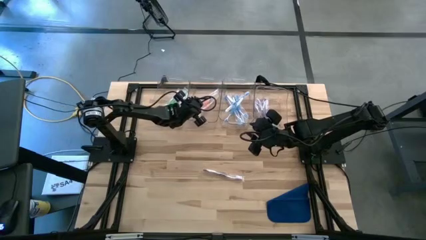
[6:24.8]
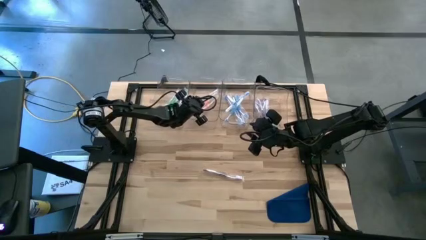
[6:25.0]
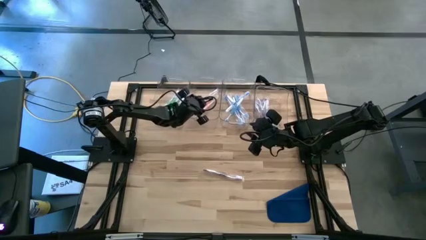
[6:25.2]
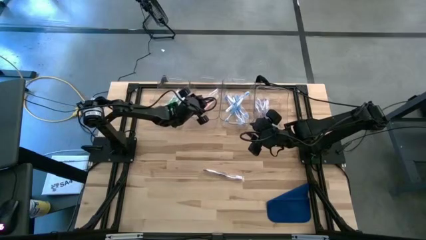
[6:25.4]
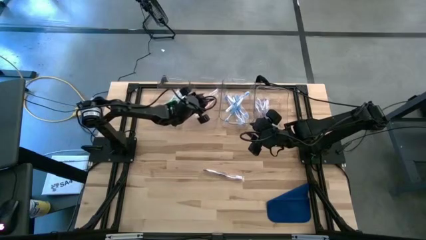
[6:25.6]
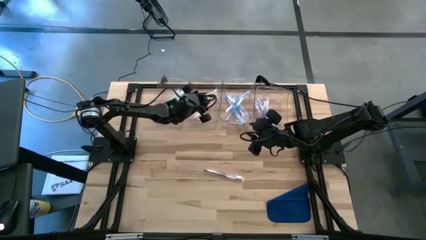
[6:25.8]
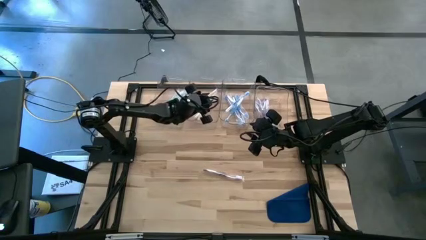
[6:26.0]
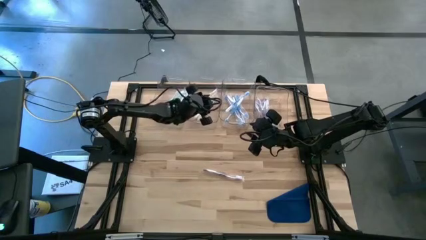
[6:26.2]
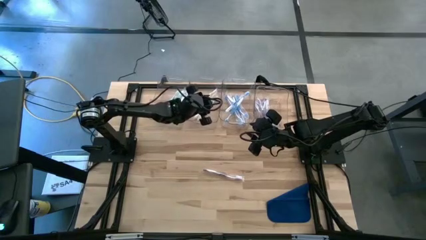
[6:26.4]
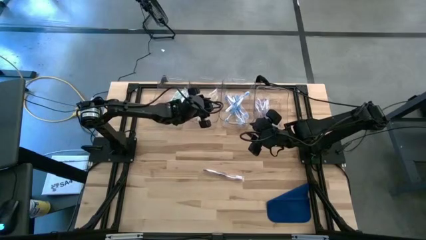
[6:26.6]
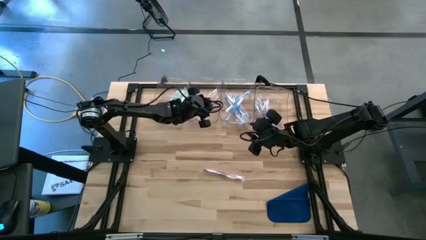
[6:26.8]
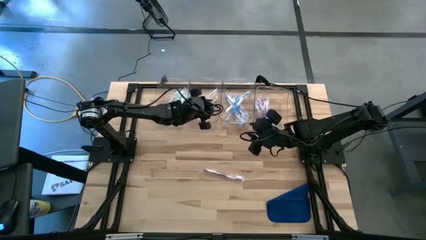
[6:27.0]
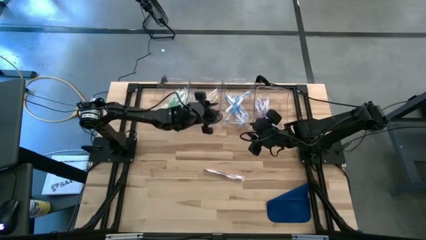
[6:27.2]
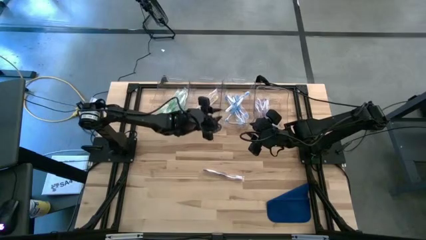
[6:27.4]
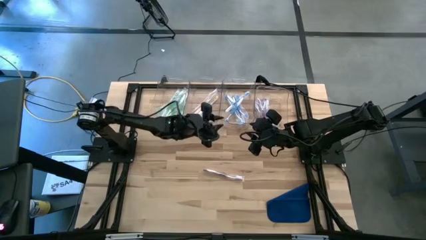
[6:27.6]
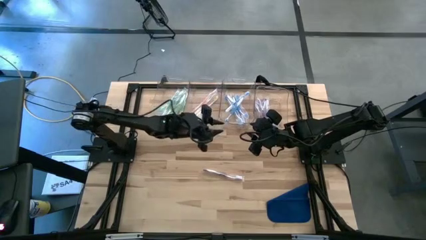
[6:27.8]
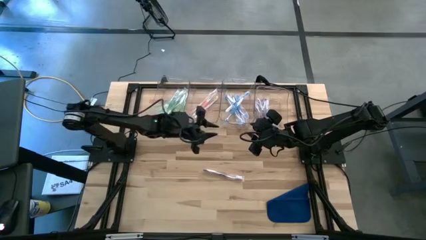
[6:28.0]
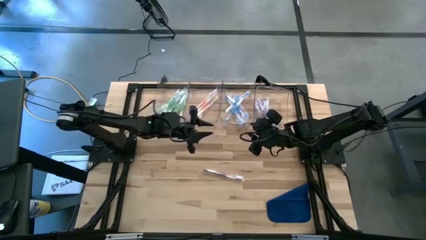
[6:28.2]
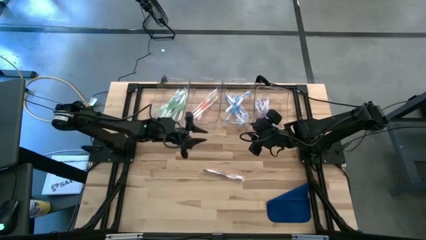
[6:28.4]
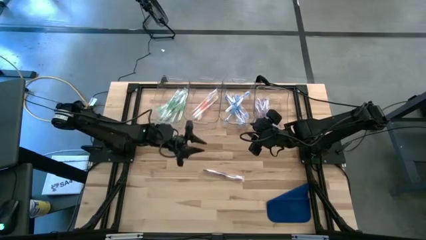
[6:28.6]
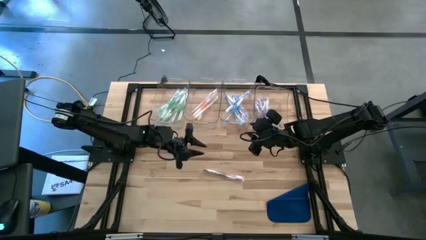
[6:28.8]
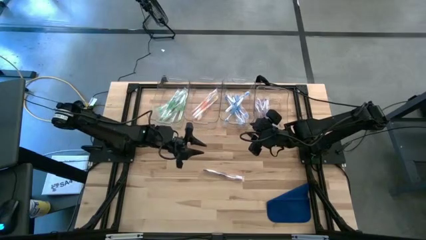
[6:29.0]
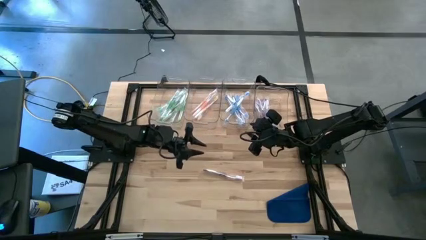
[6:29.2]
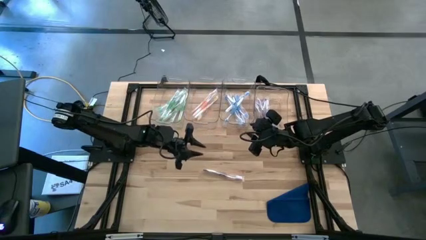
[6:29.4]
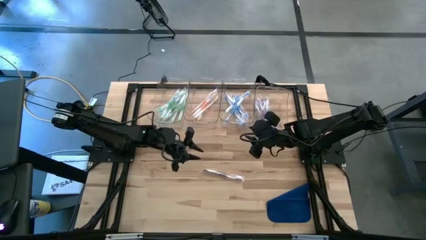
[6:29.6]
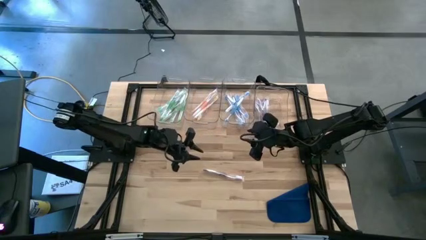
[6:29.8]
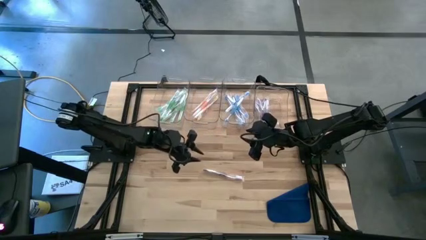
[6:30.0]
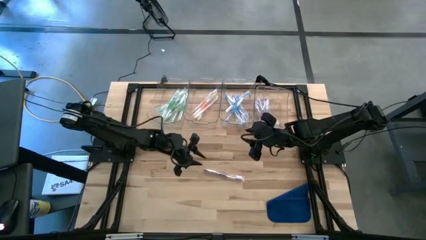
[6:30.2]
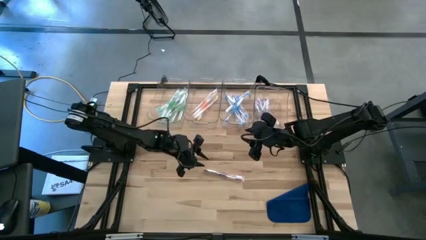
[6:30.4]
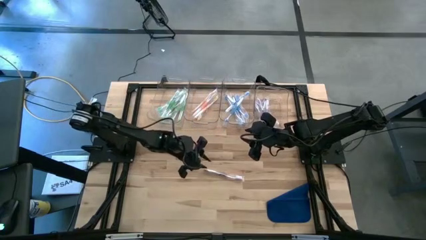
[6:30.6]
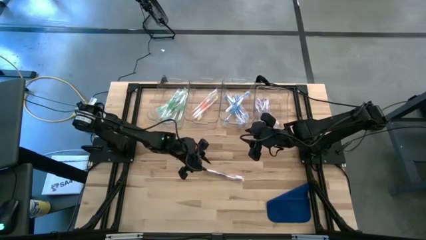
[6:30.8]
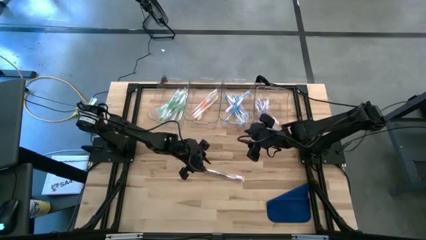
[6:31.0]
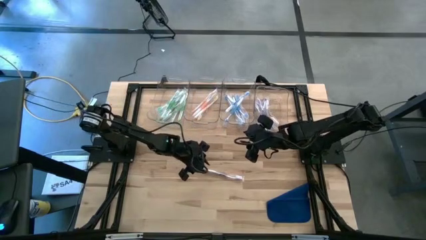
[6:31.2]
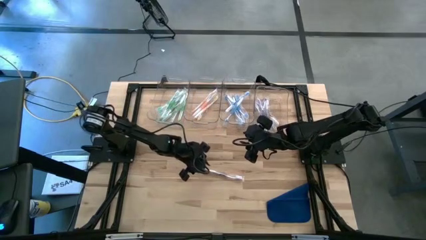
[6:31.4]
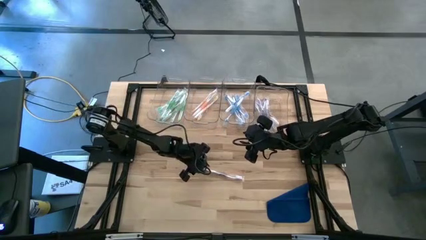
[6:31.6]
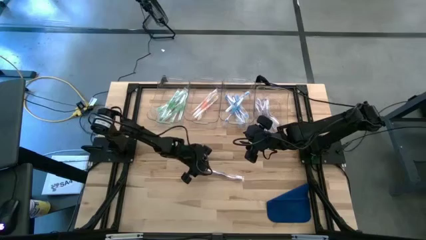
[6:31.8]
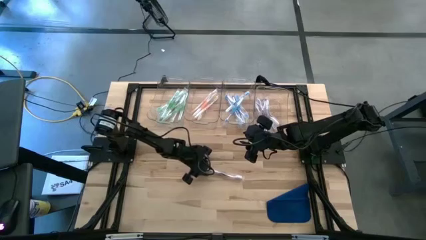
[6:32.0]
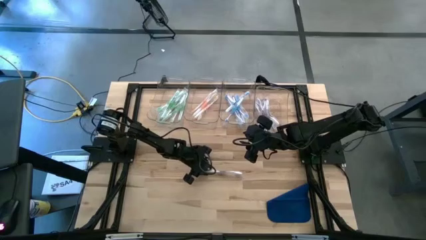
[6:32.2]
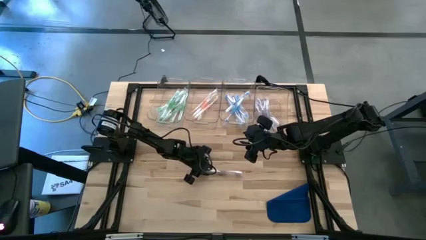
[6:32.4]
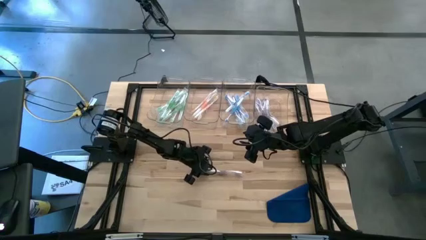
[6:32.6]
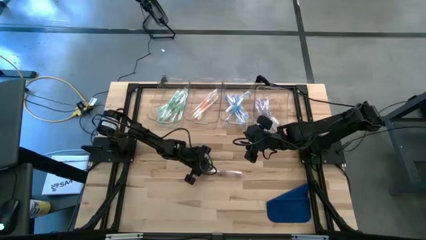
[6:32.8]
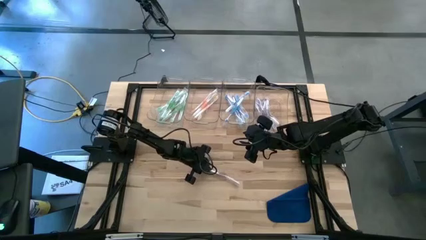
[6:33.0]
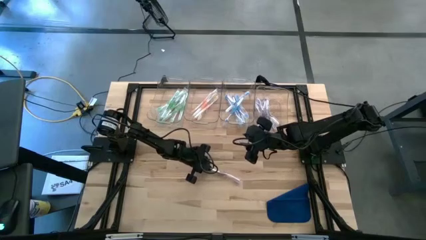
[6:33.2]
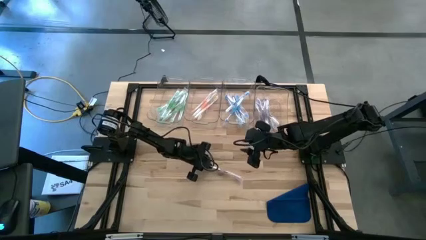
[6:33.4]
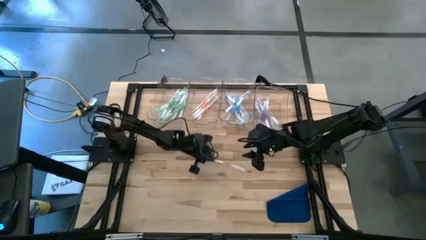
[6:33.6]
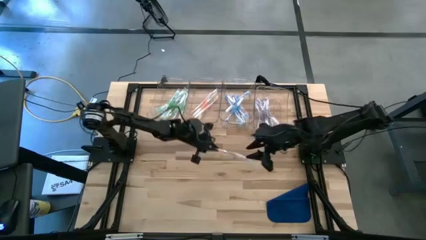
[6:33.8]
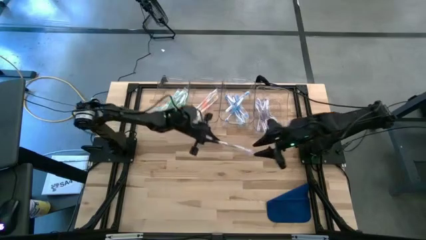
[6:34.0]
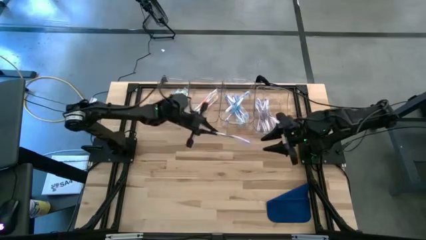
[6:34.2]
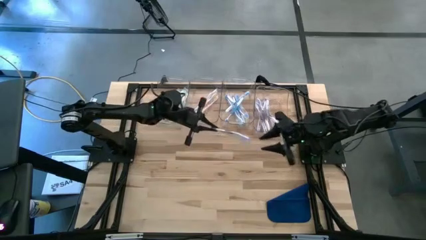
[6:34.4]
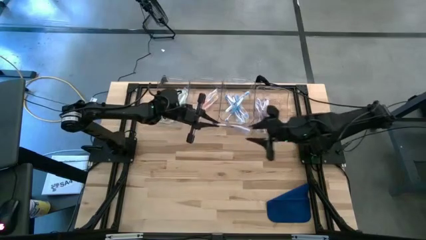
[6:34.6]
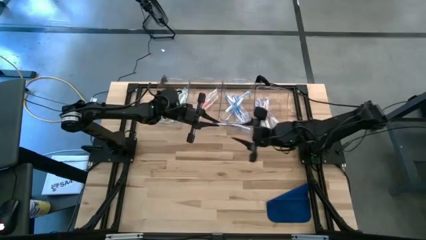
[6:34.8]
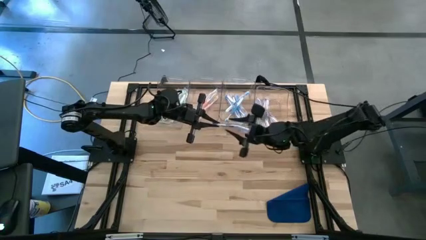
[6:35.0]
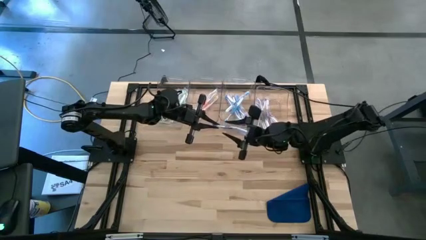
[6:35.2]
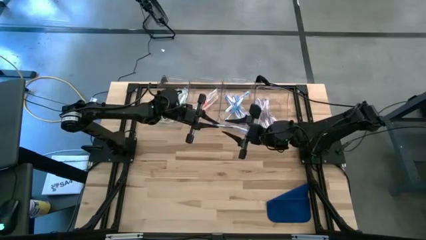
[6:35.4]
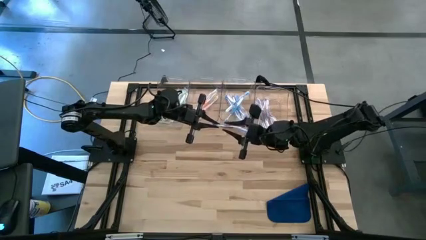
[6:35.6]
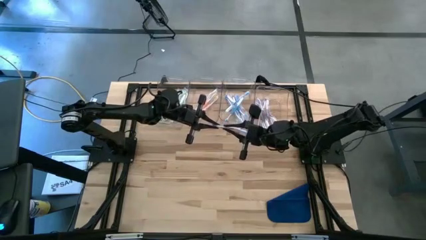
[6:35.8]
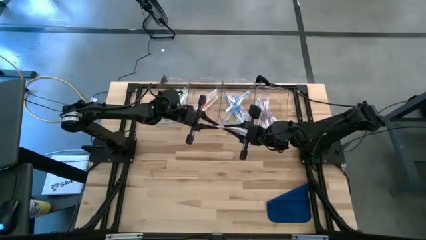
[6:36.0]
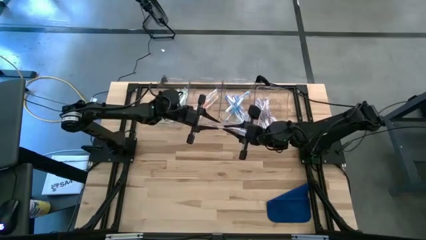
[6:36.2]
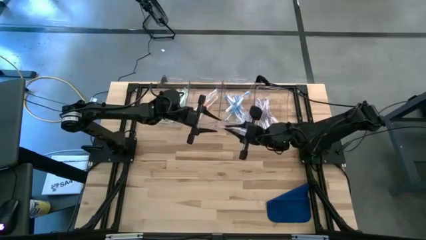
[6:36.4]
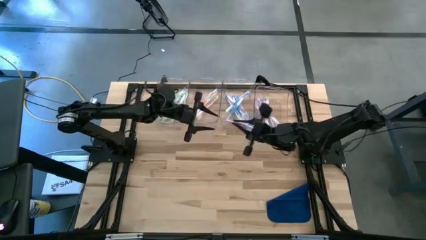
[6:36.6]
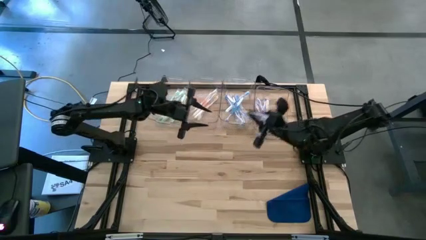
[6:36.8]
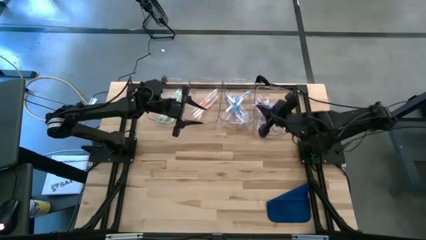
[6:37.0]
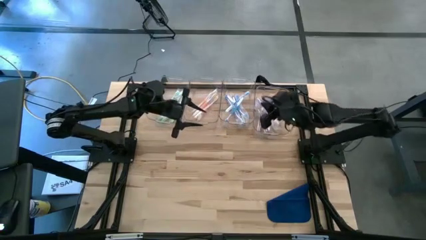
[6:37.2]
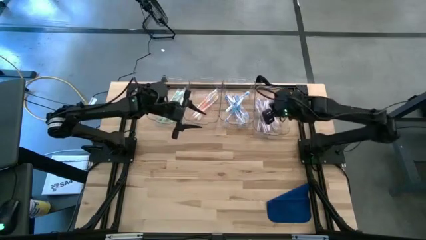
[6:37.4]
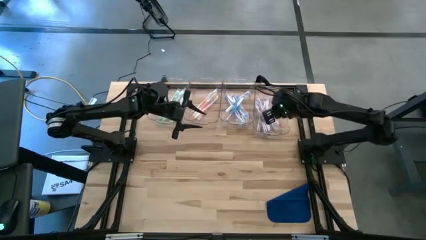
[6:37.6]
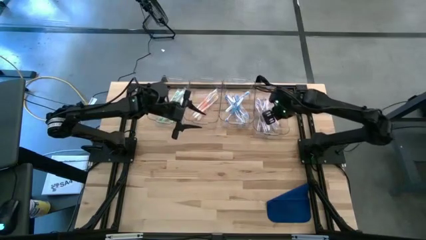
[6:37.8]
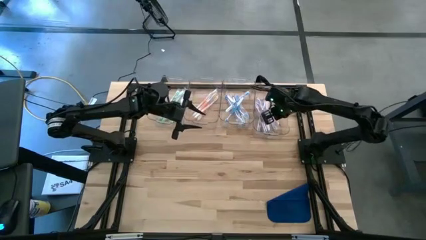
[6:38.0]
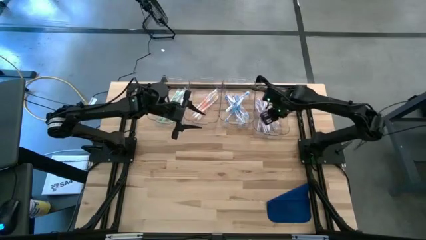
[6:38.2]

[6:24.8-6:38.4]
Task: Pick & Place Toothbrushes
Put the violet toothbrush into the right transparent bin

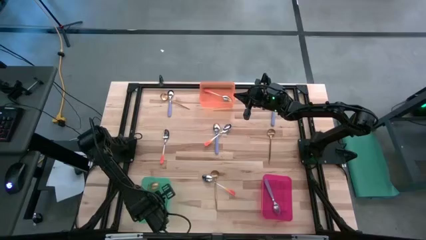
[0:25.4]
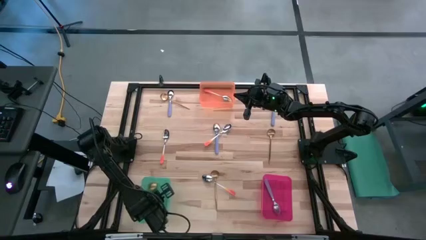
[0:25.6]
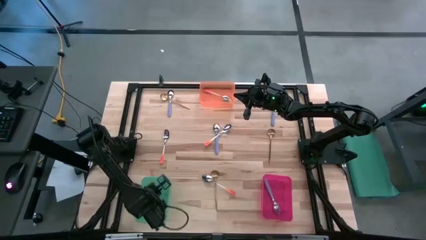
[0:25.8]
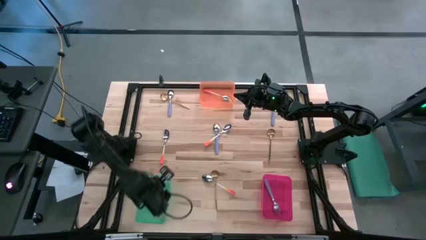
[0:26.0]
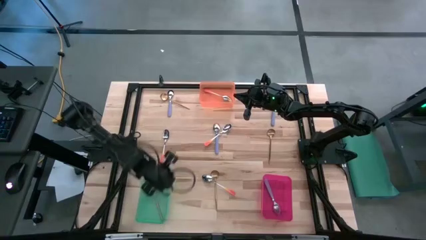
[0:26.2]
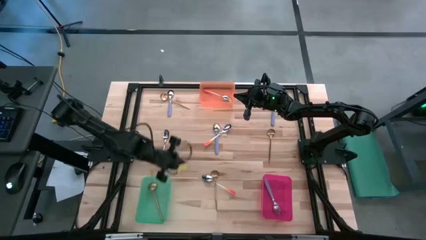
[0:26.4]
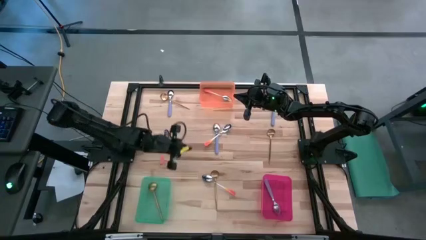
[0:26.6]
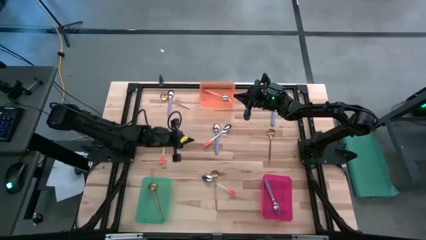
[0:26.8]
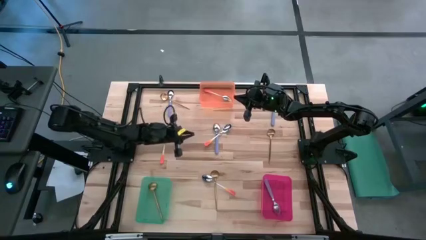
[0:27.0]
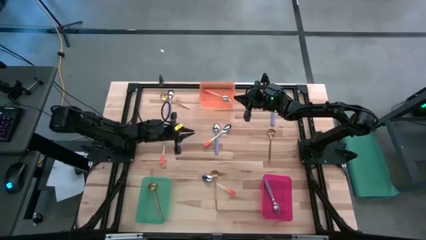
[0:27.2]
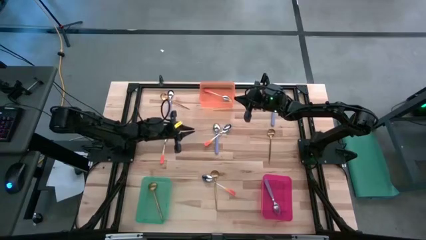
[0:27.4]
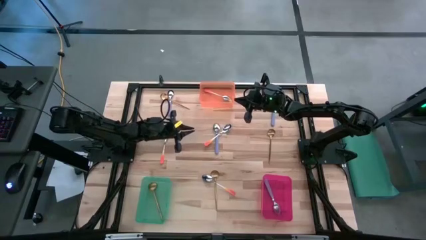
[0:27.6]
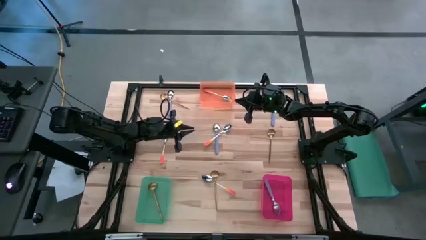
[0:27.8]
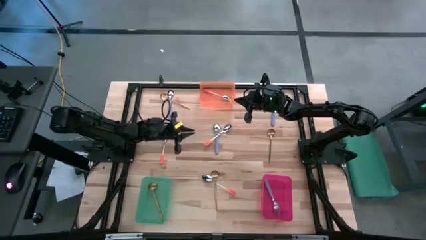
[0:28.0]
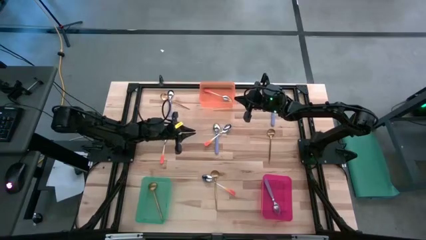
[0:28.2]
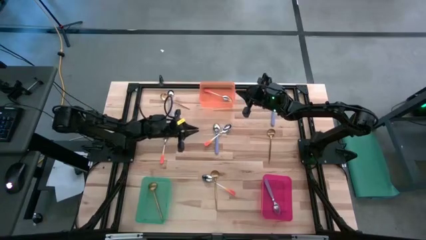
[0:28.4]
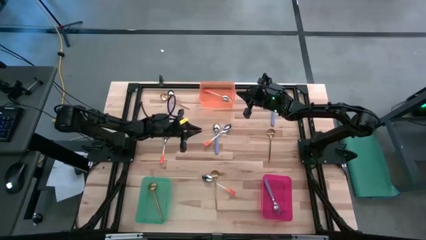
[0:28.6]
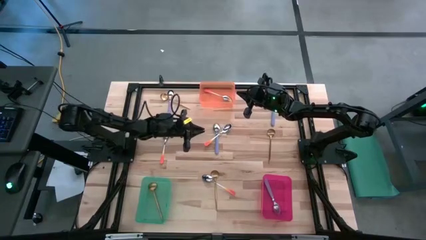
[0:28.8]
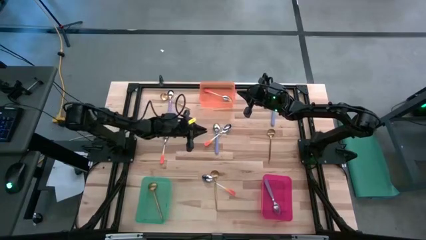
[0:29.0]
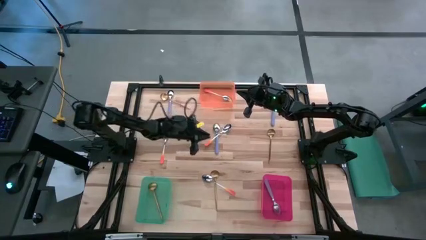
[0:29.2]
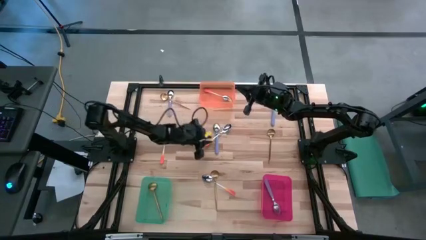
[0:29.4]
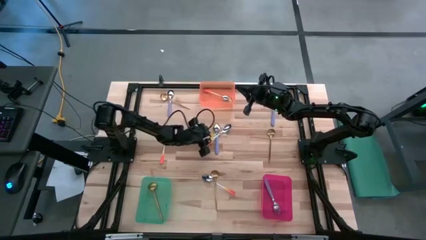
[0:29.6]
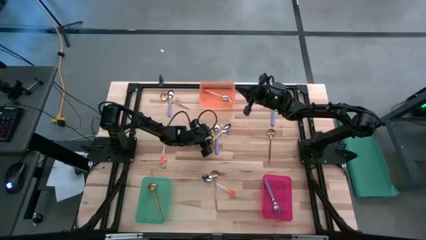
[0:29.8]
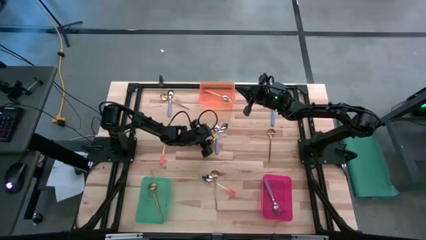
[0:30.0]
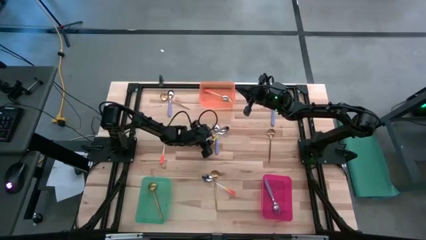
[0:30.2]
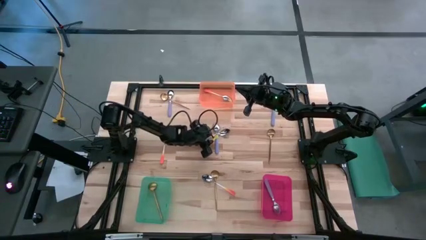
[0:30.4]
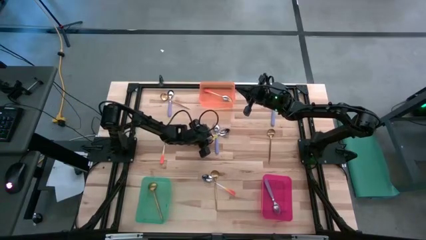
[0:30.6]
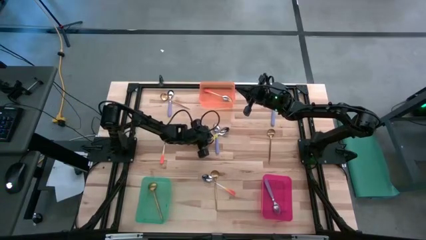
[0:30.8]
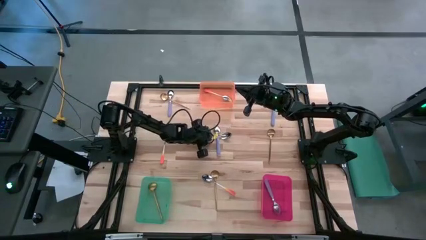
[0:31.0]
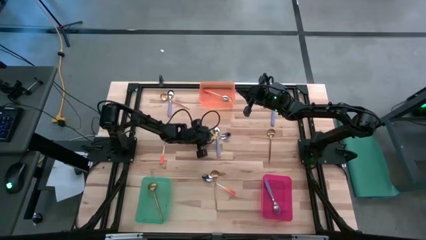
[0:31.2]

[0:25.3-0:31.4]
Task: Sort silverware by color (type)
Put the orange spoon into the orange bin
